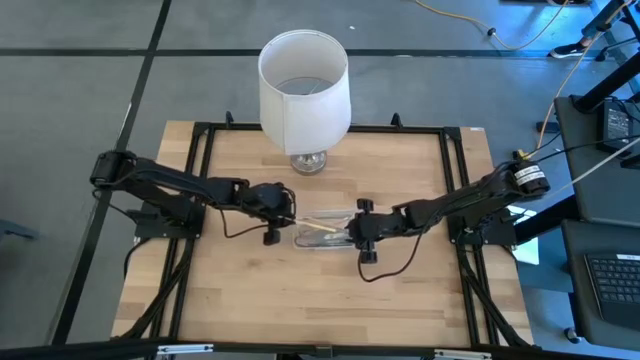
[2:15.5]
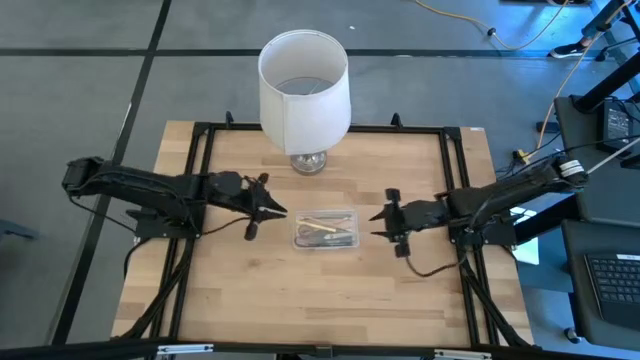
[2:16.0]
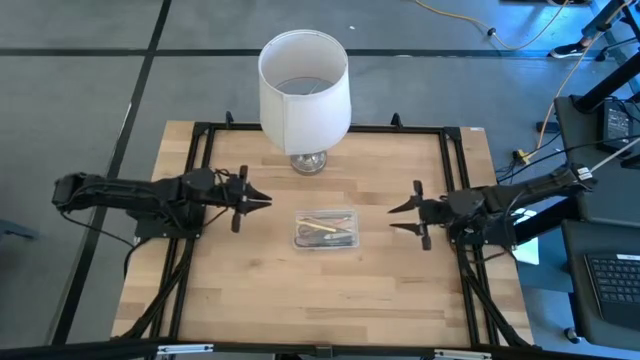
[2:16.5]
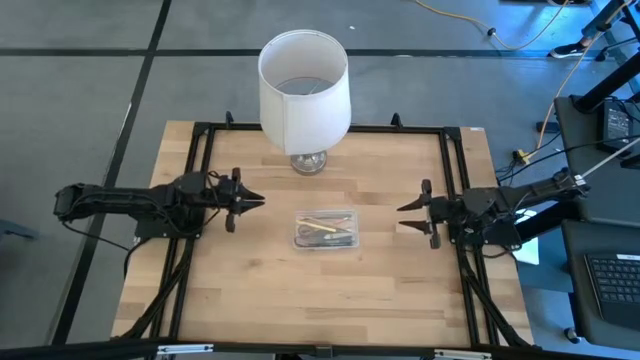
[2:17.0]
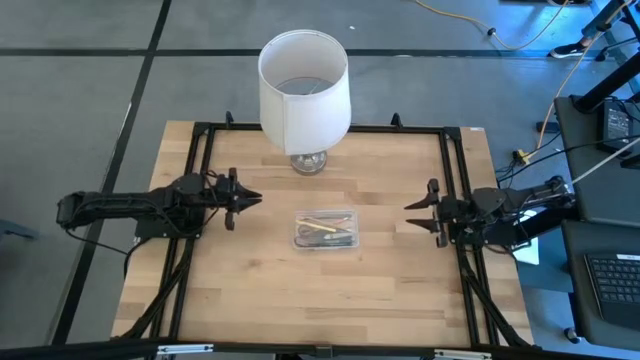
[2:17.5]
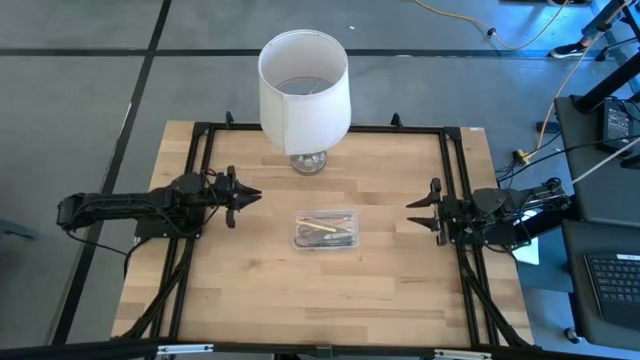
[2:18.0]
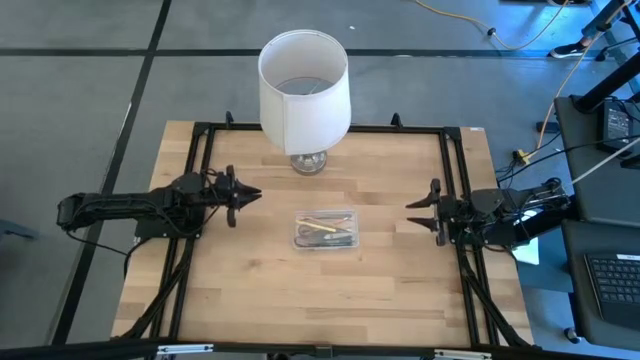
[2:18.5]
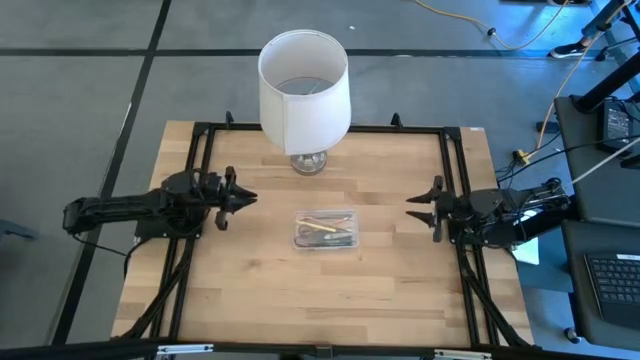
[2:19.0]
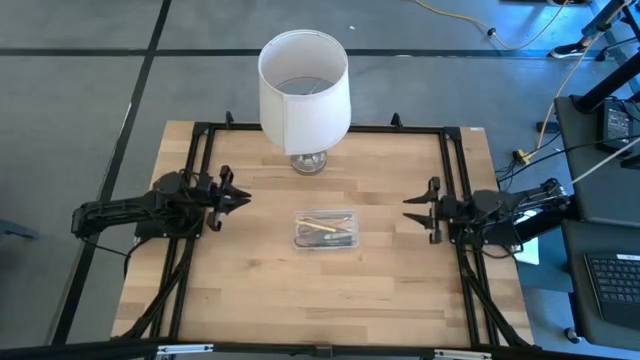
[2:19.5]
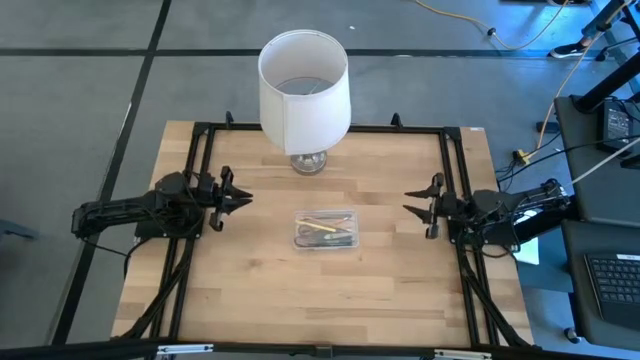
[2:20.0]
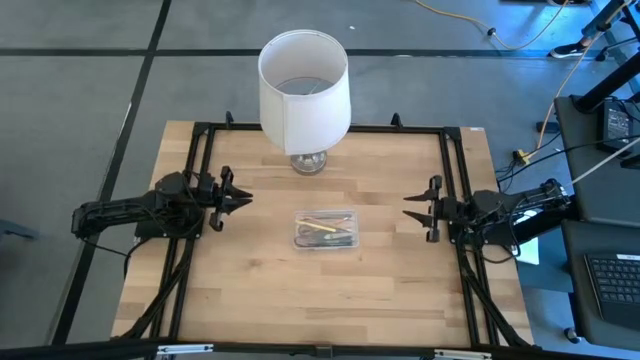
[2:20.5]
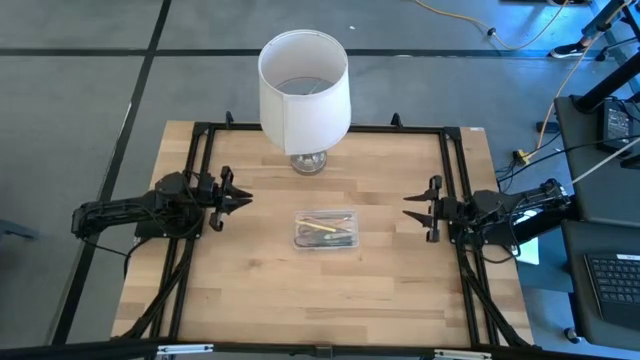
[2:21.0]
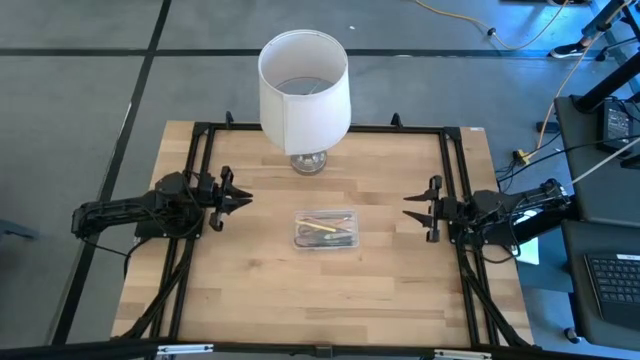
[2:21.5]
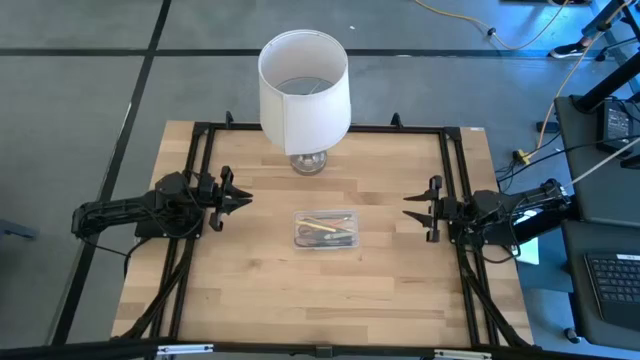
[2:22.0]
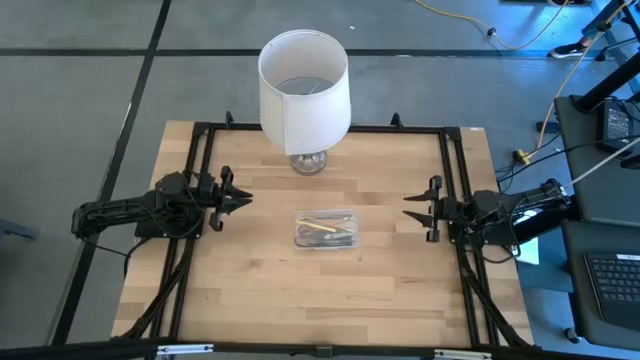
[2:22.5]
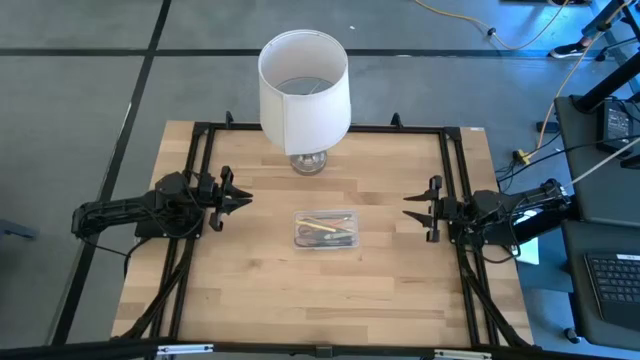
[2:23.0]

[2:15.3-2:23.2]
Task: Pick & place school supplies into a supply box
Return to Home Position

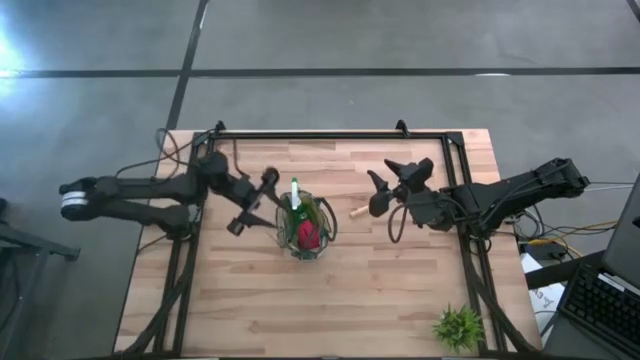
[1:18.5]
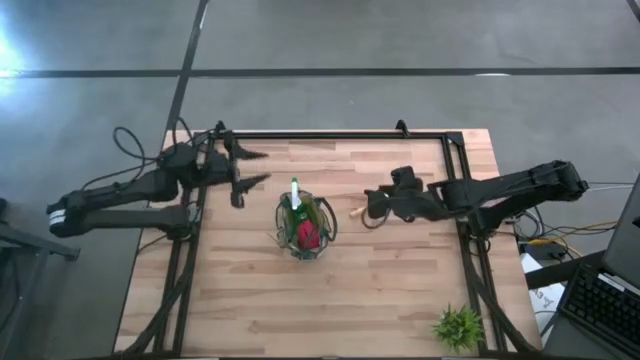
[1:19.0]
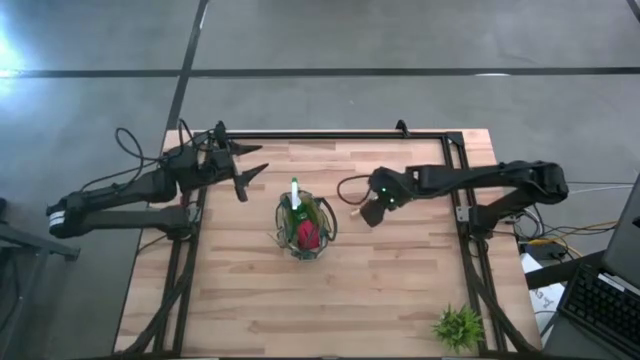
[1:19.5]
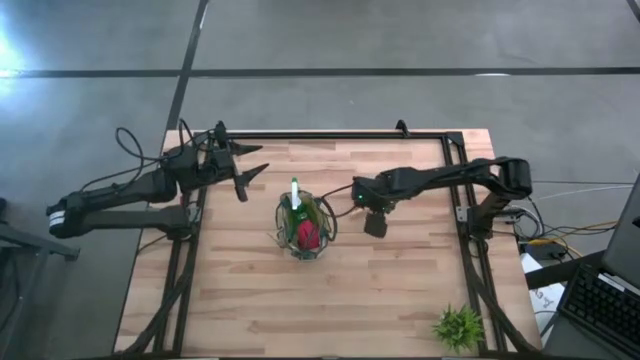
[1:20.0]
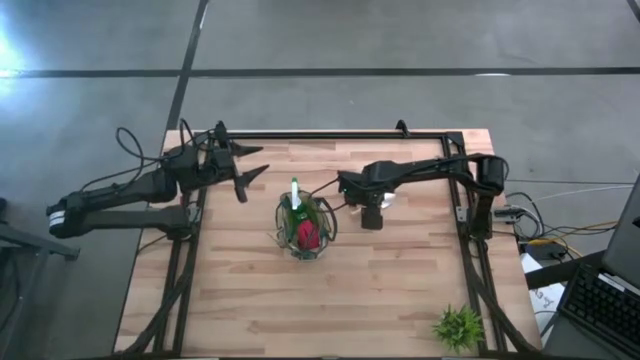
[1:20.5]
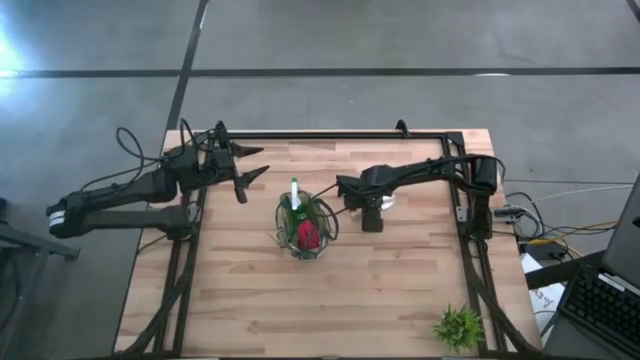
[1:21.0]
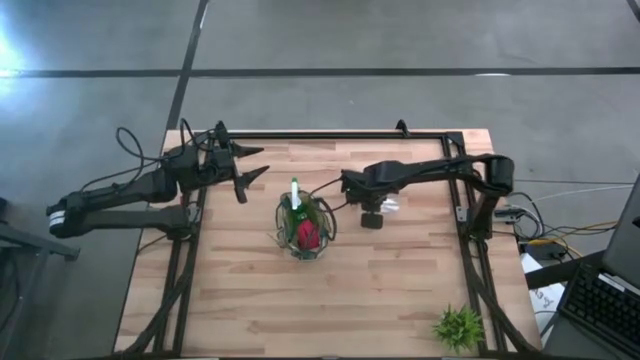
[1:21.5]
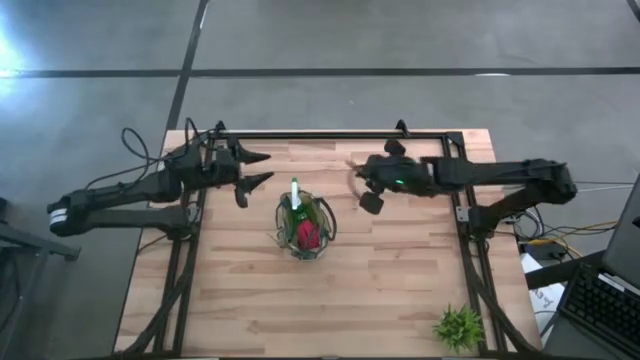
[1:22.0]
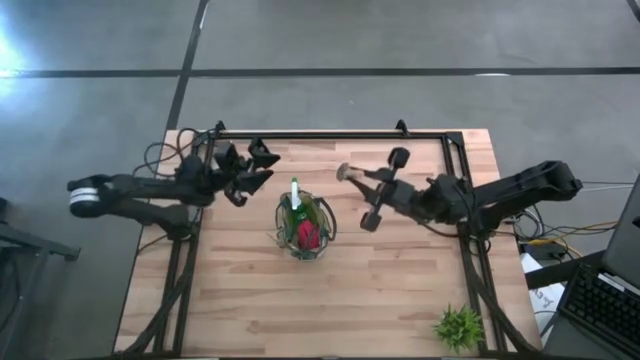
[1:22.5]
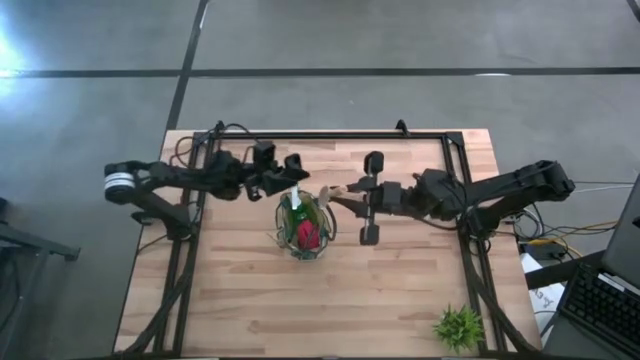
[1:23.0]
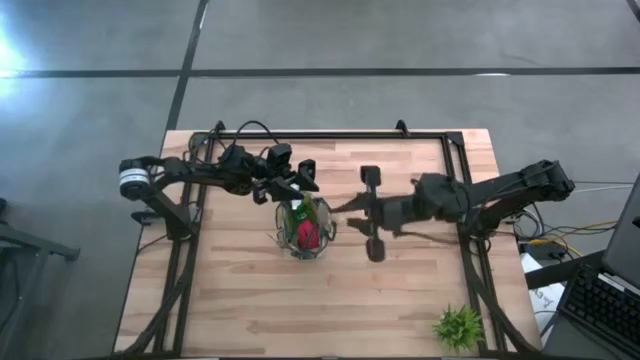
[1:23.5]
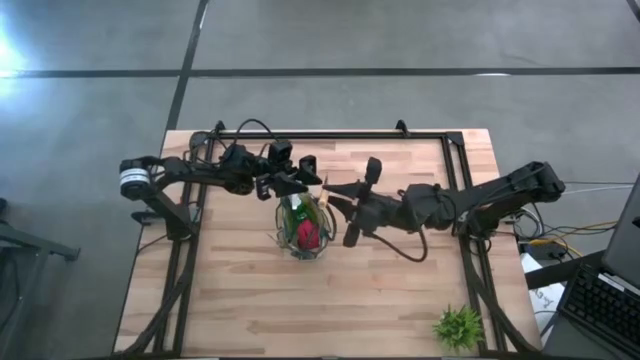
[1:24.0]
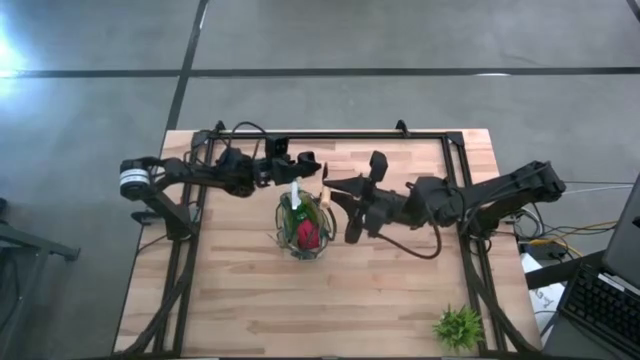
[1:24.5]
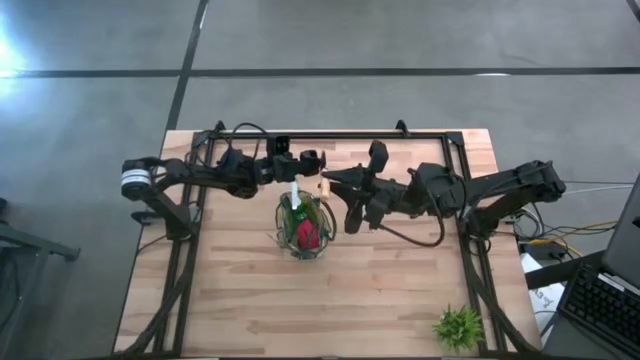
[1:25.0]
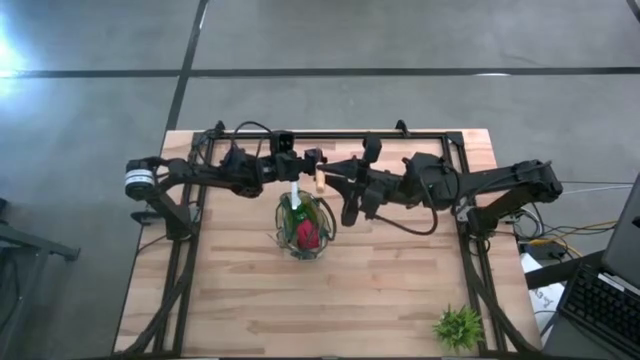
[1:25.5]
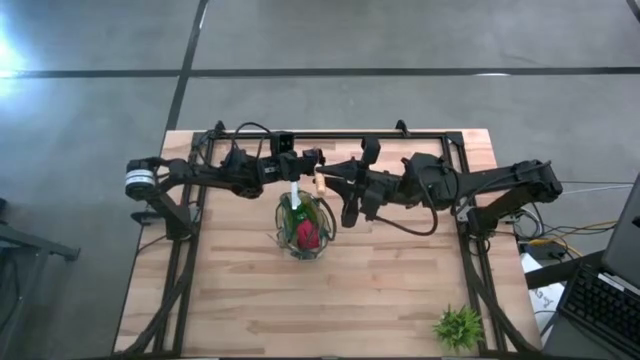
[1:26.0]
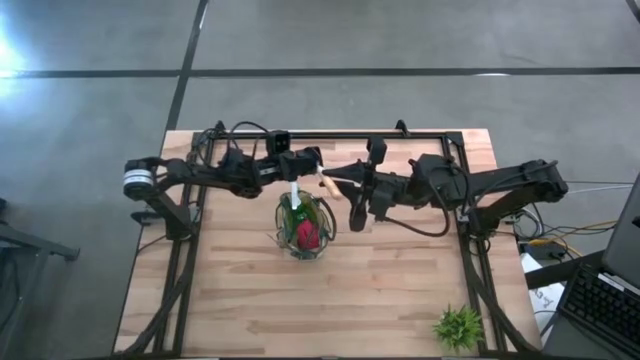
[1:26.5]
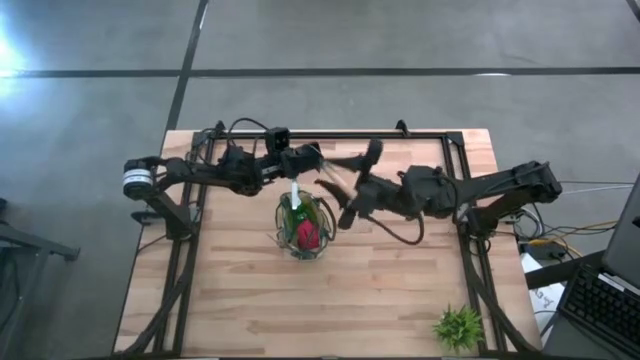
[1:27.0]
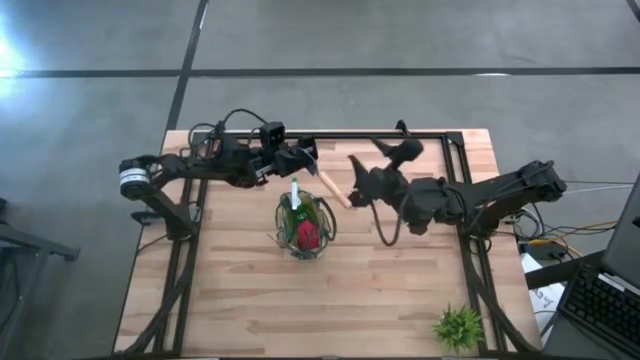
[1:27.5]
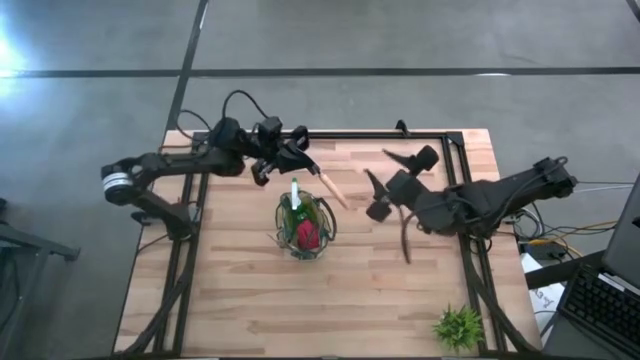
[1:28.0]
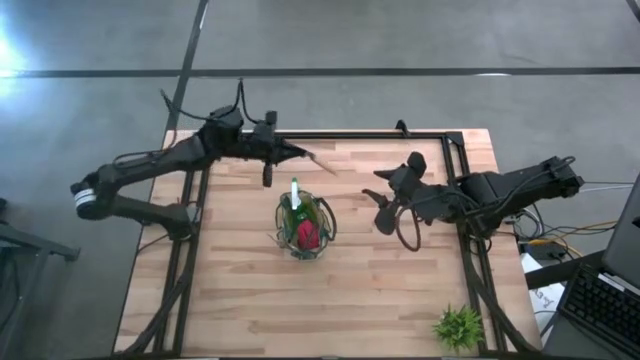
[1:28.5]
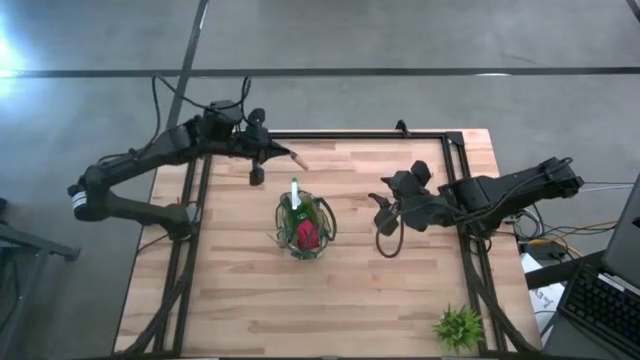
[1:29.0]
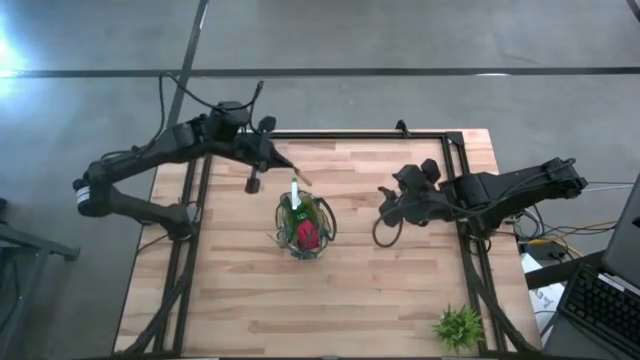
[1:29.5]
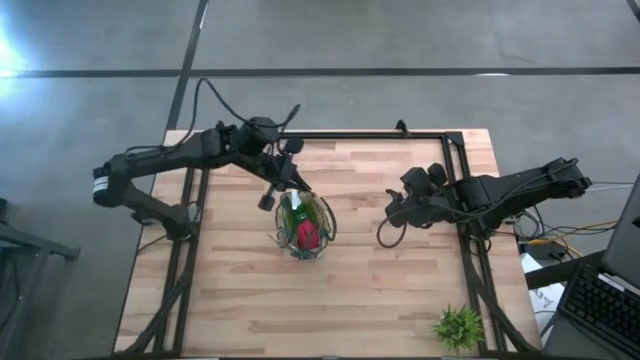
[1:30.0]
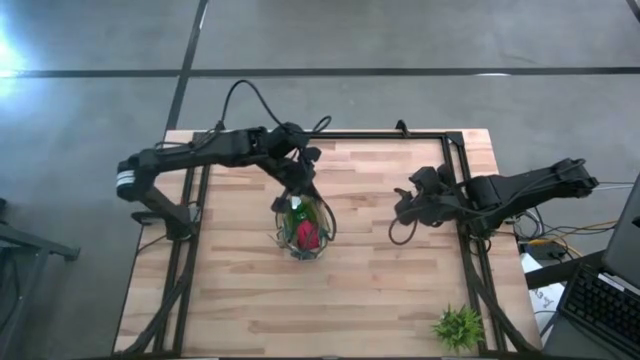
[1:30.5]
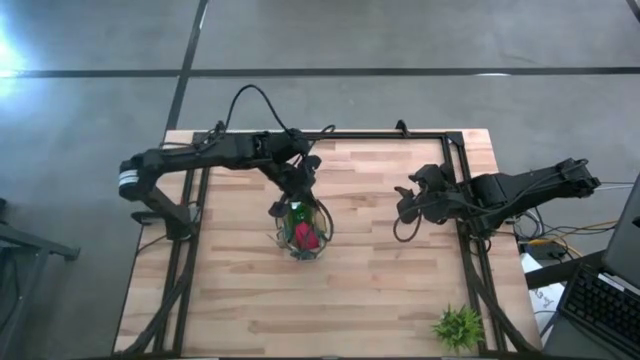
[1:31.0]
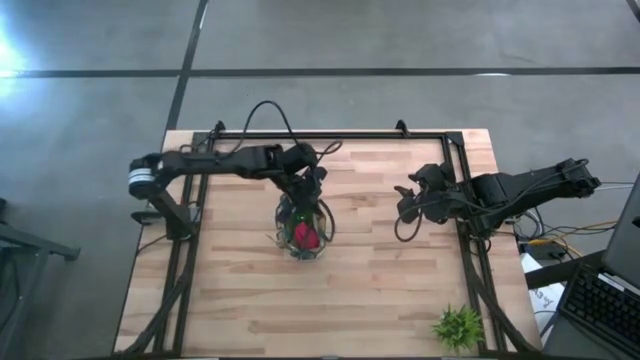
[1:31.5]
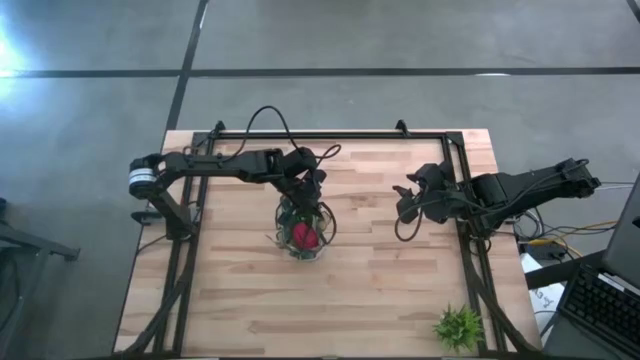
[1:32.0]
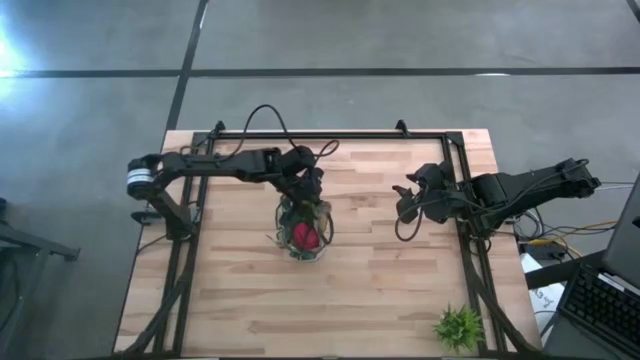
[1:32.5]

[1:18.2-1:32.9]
Task: Pick & Place Garden tools in Gardening bag
Put the brown trowel into the gardening bag
